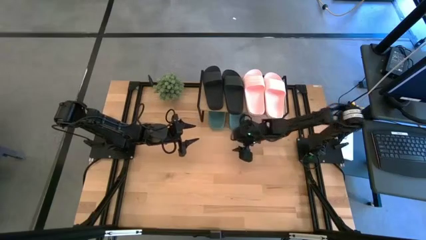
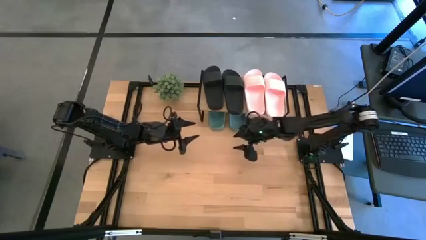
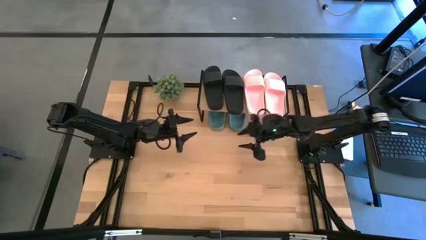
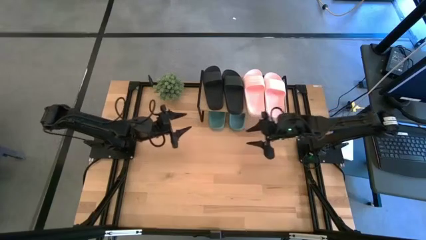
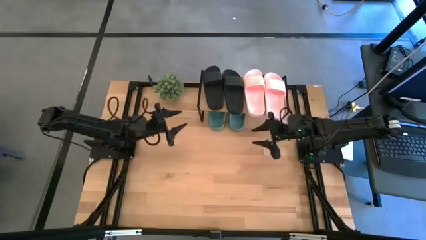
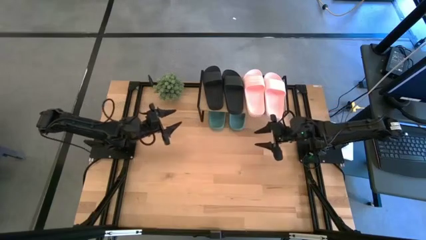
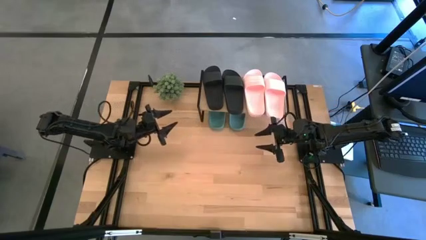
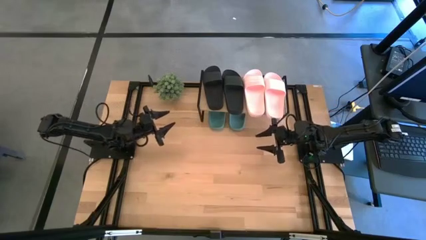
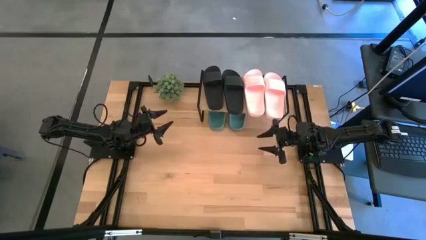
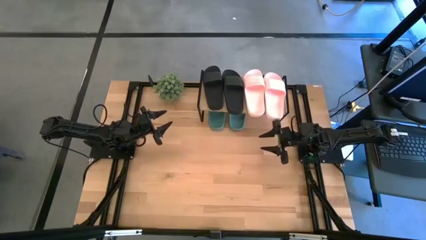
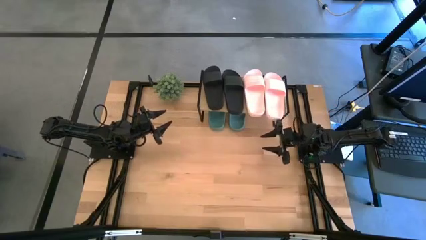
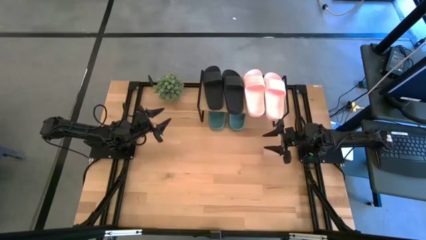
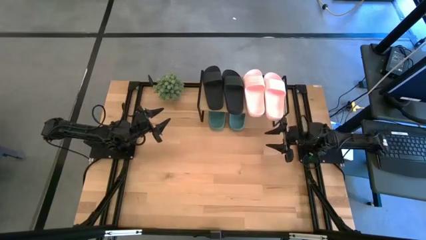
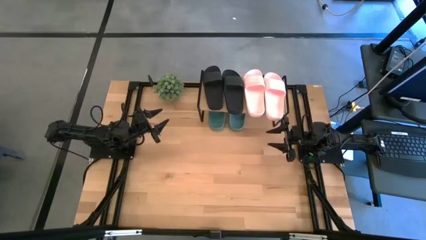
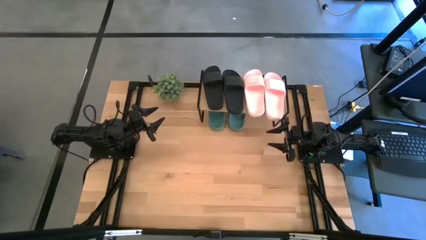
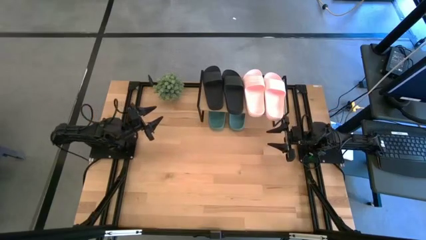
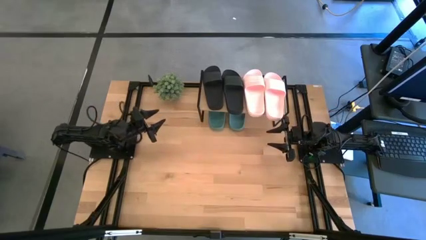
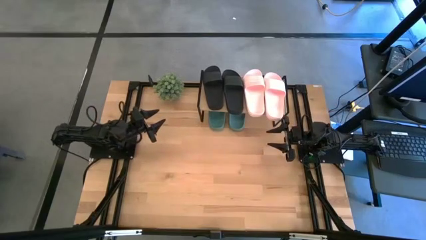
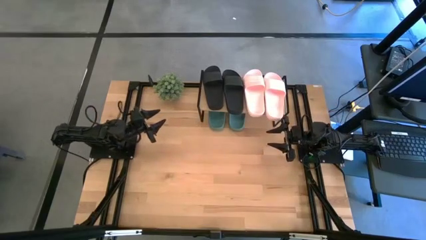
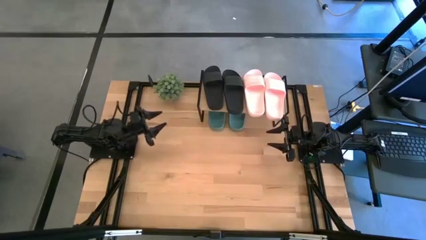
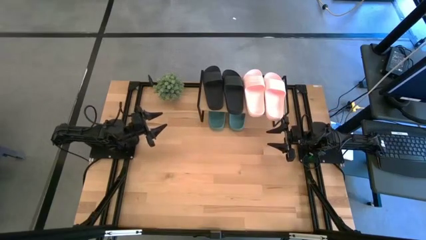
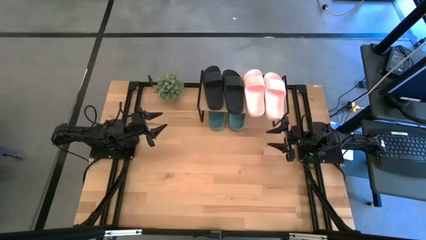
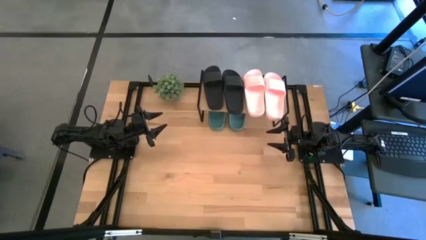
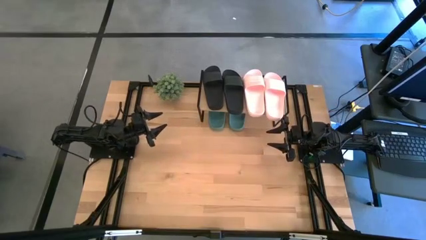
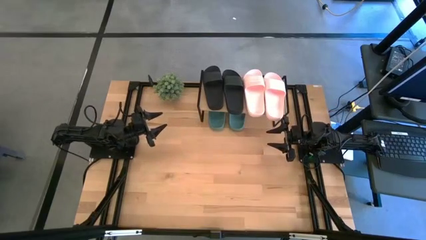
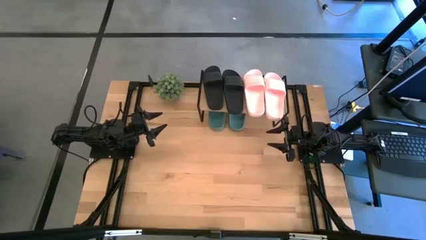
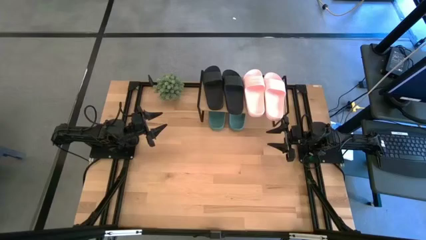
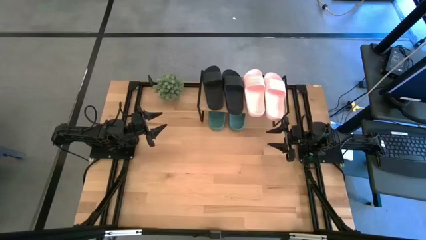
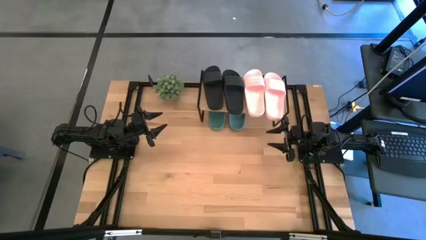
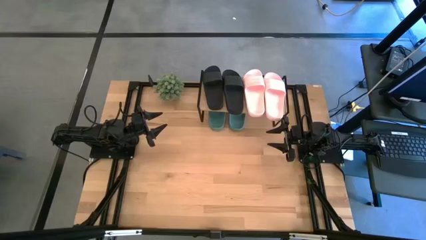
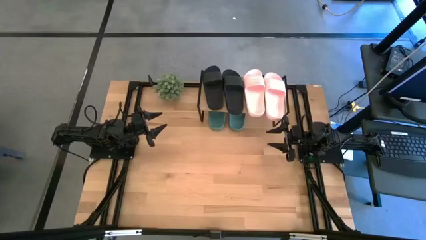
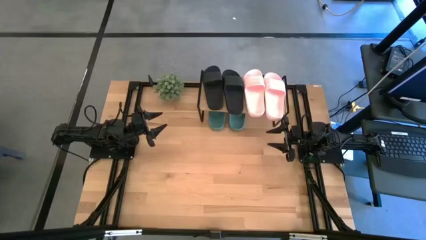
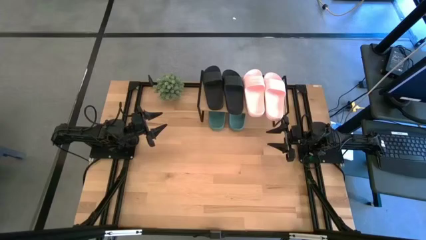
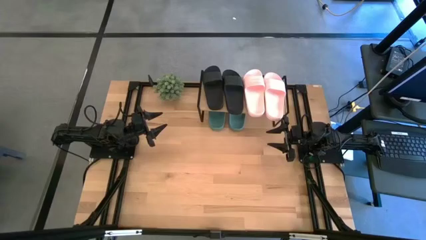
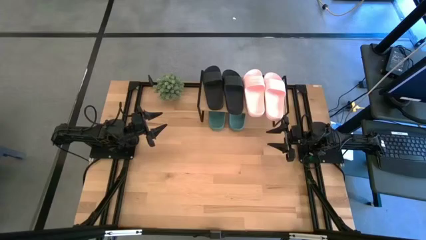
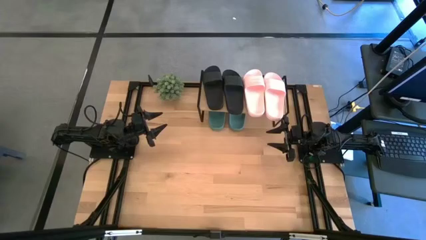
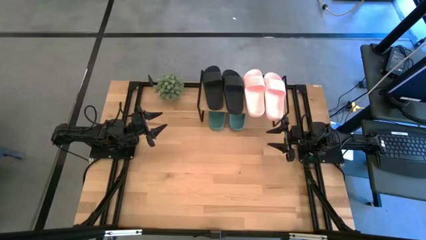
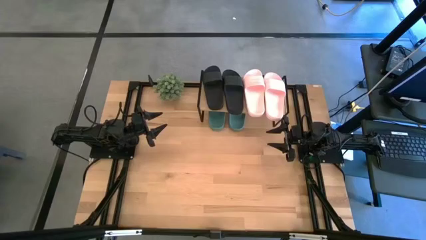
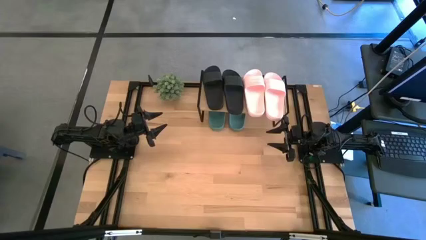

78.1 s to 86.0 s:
Task: Pick and place slides into the shelf
Return to Home Position

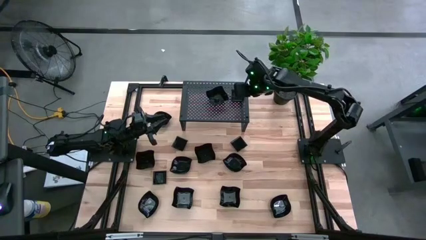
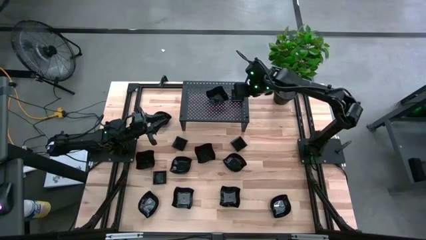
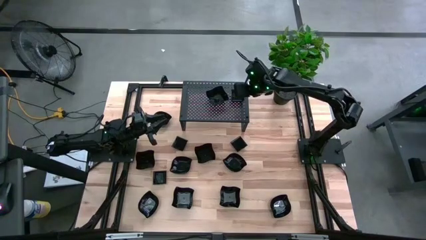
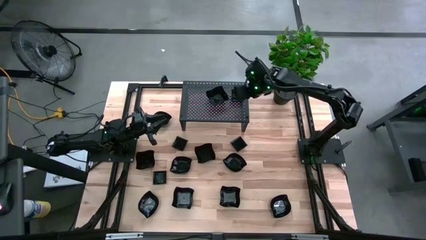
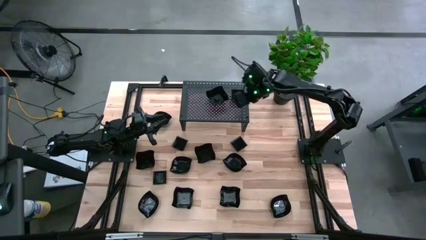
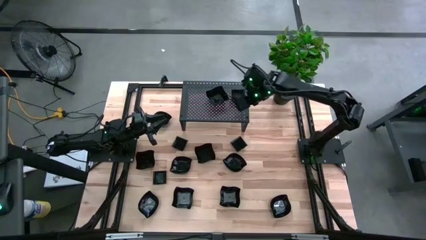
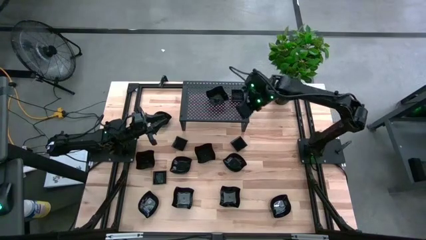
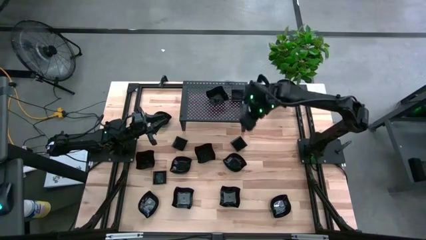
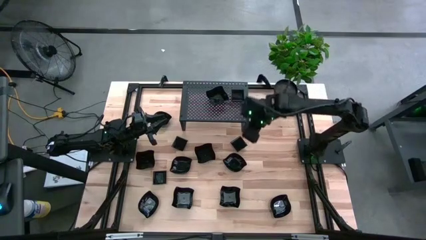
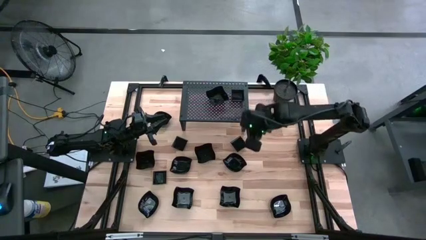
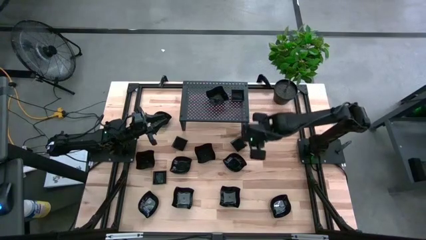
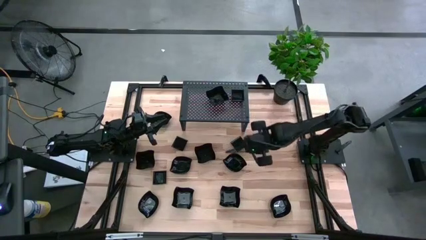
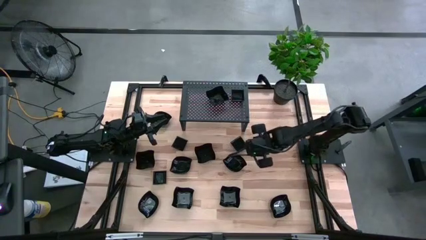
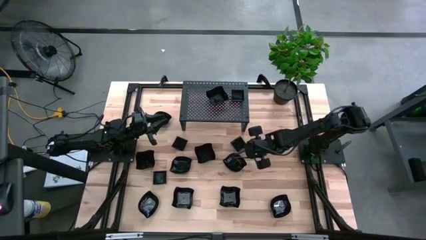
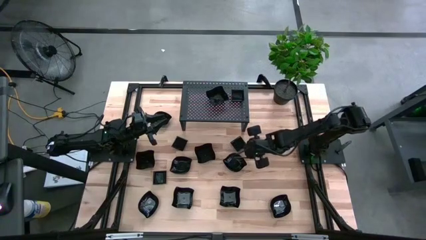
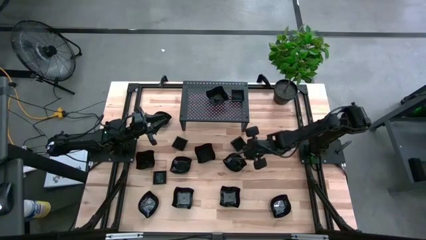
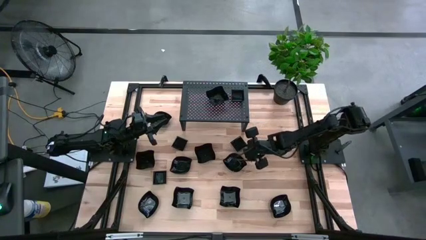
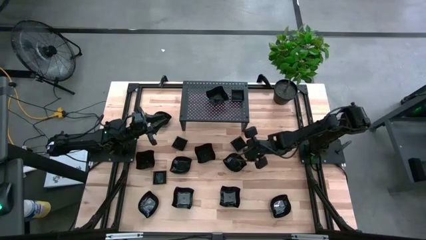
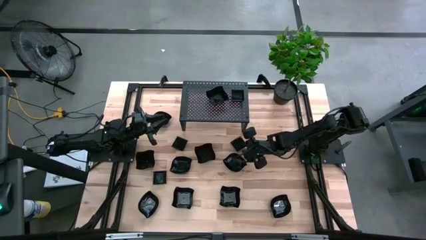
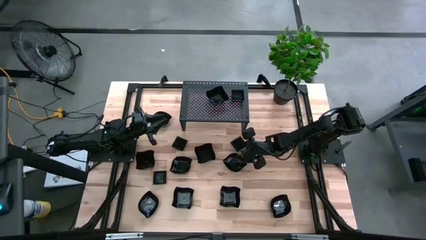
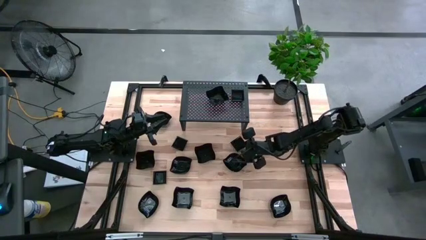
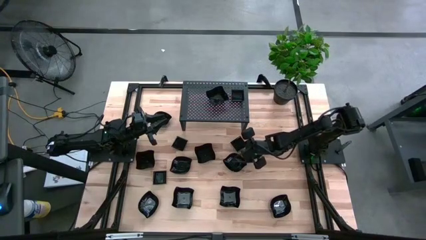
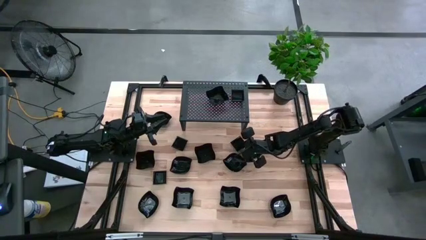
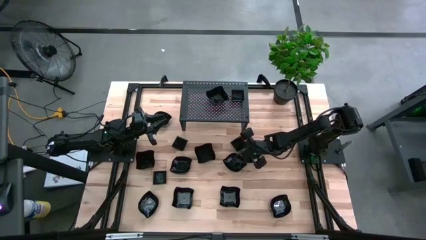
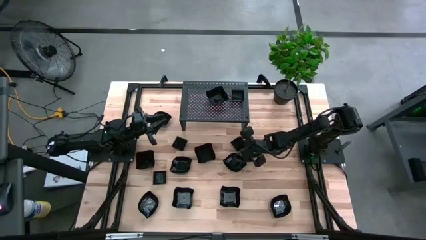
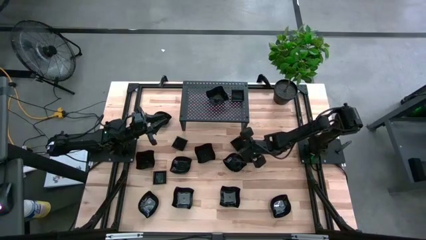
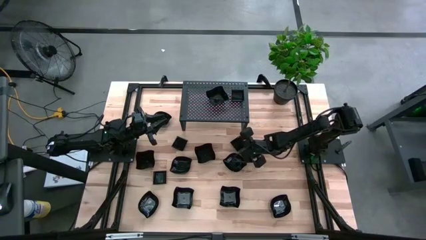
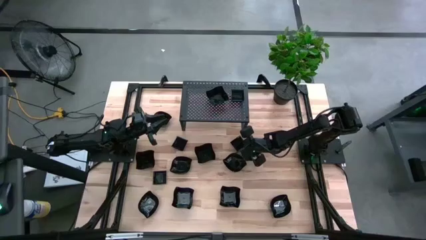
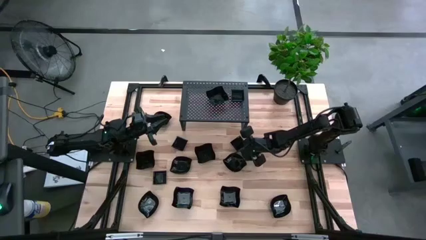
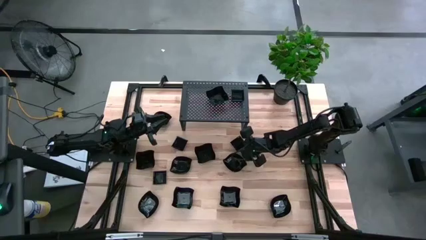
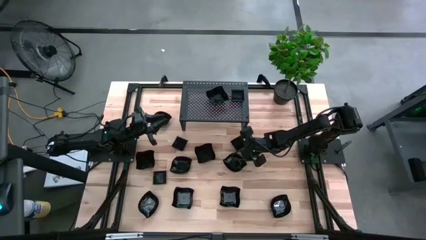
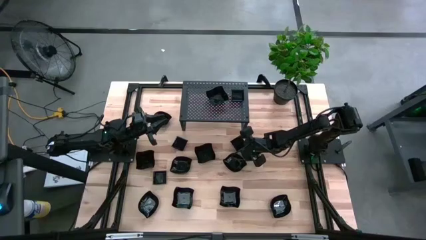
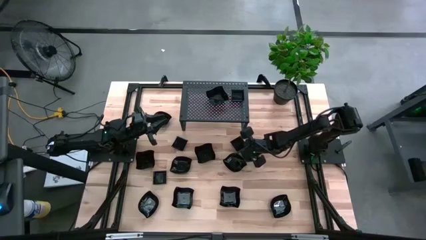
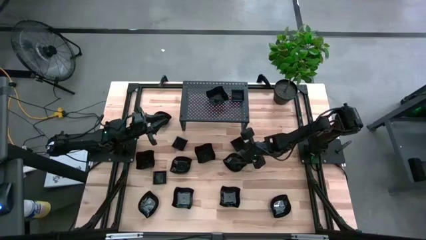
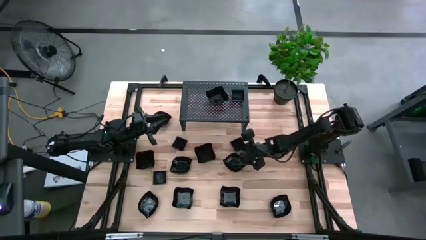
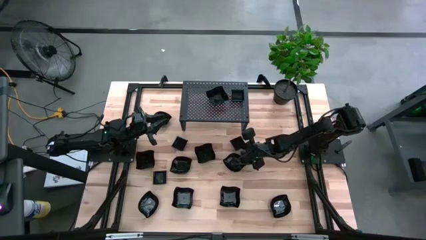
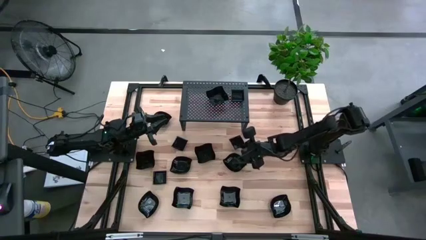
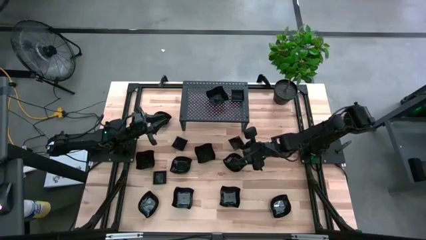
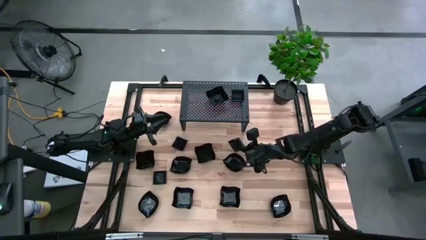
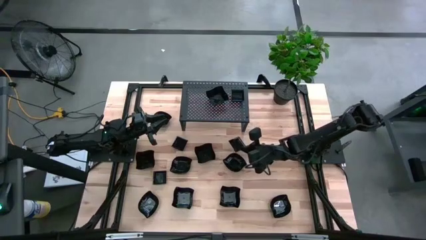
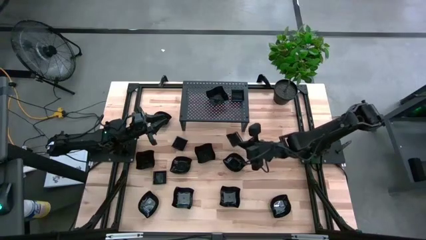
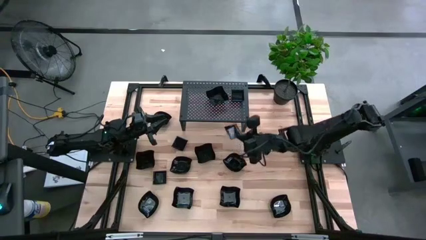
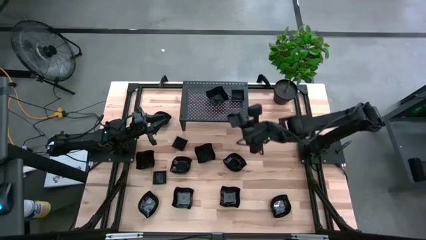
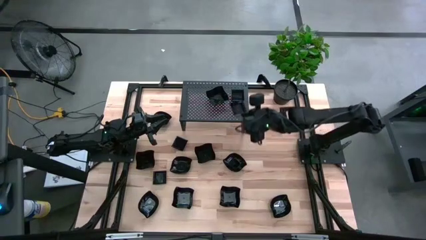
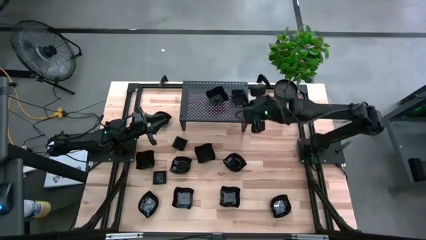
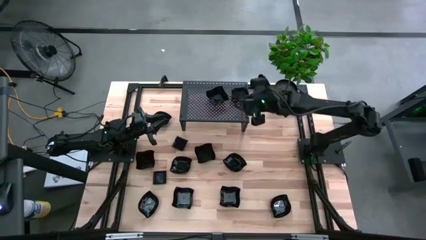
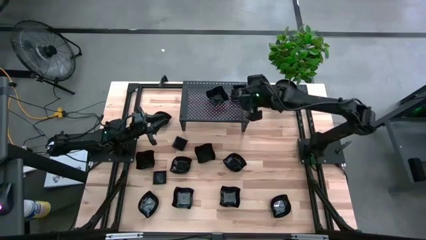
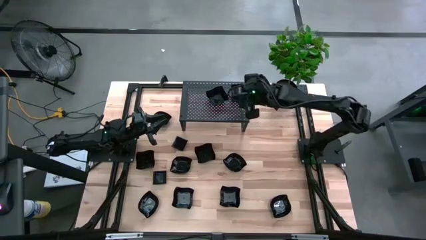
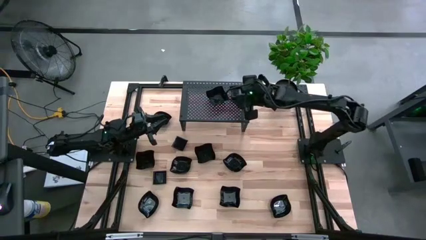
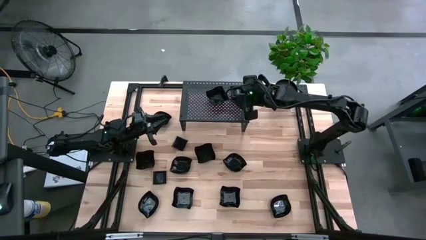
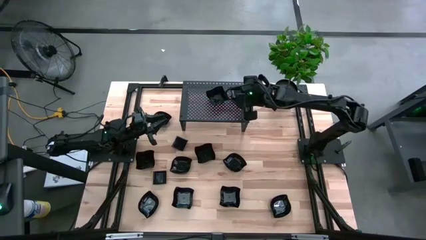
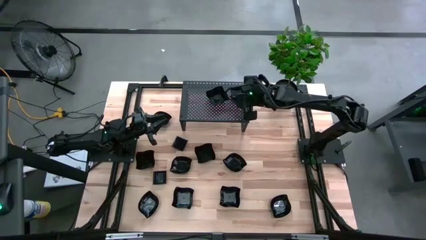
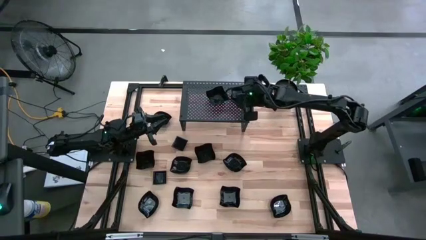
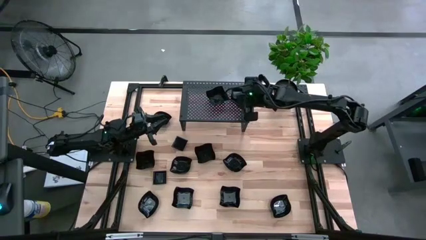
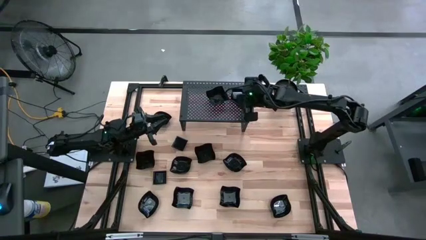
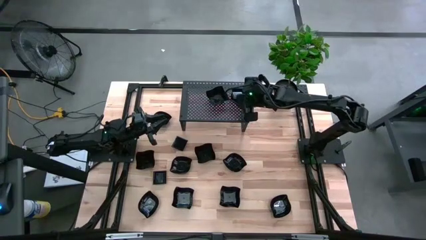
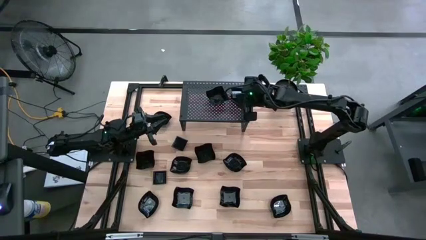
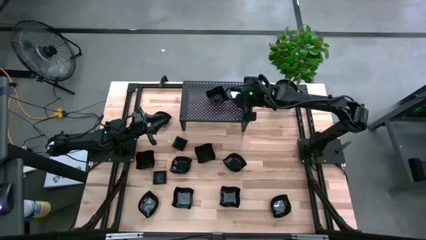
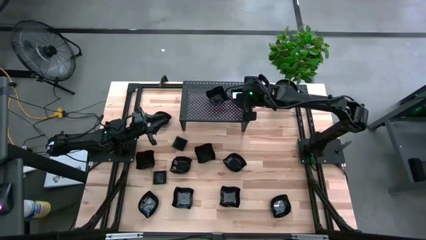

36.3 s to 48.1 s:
Task: Pick & Place Mini shaped plates
Stack the square plate on top of the square plate on the shelf
